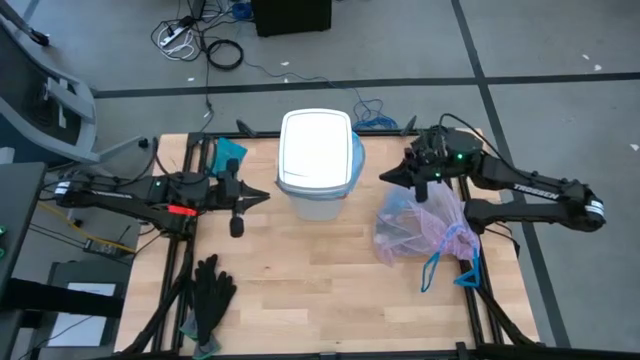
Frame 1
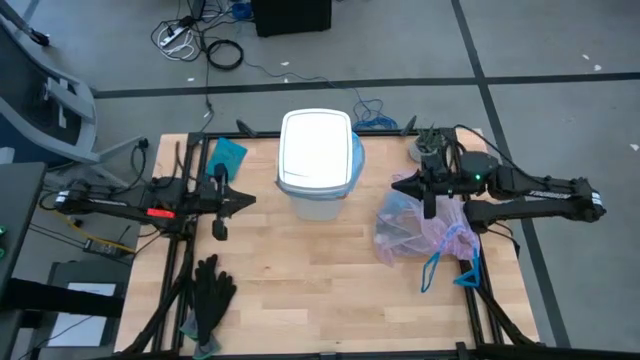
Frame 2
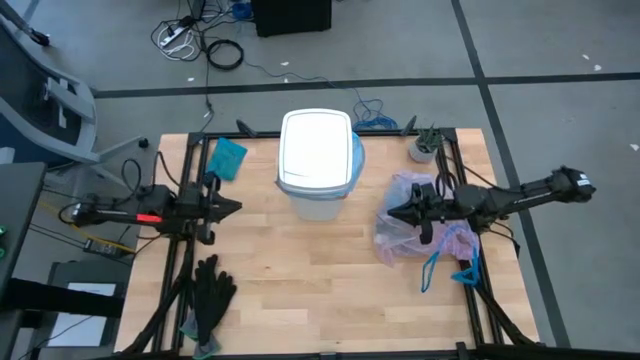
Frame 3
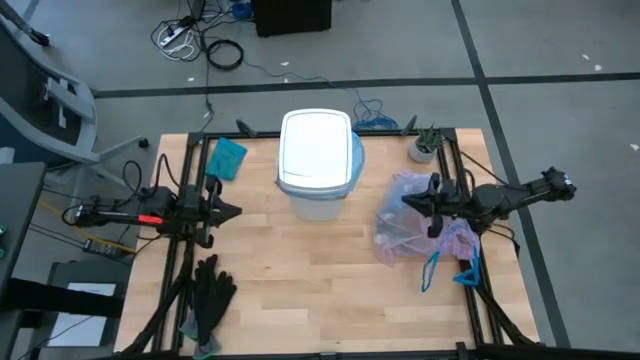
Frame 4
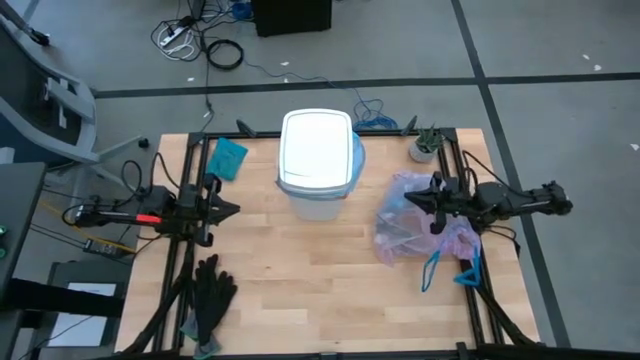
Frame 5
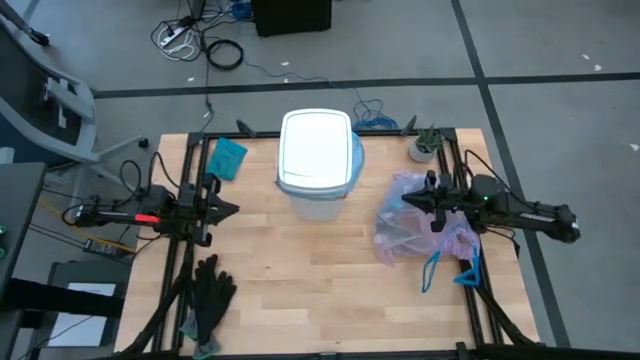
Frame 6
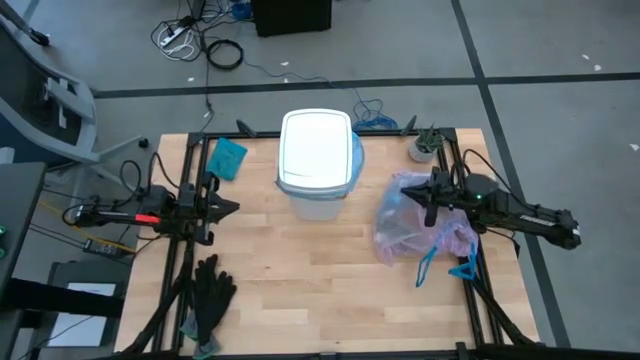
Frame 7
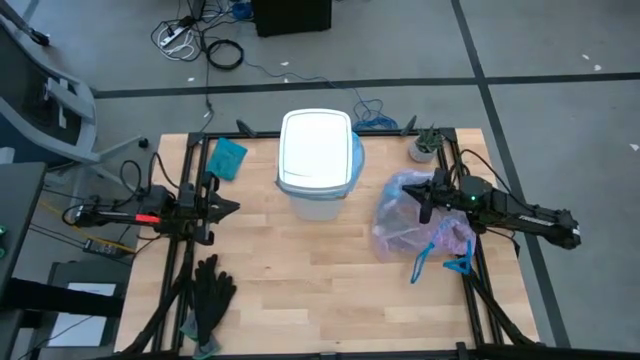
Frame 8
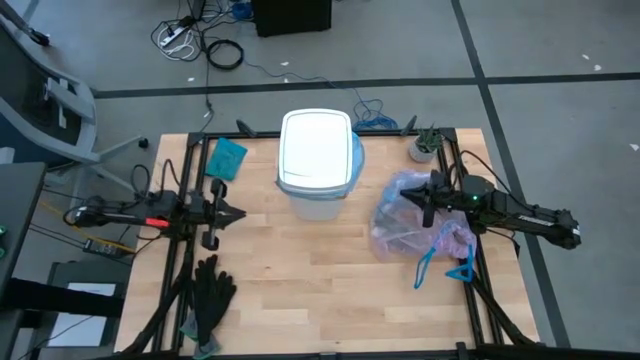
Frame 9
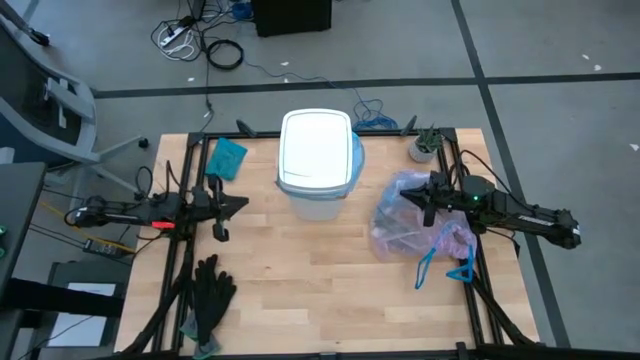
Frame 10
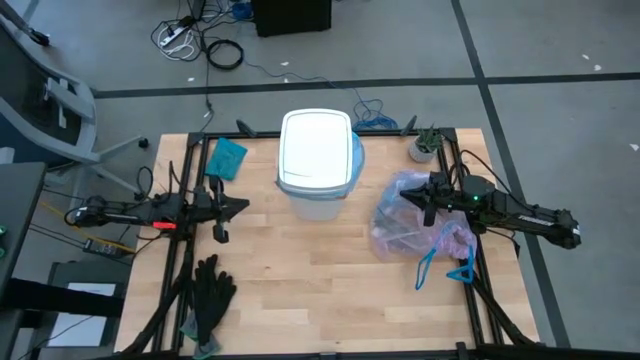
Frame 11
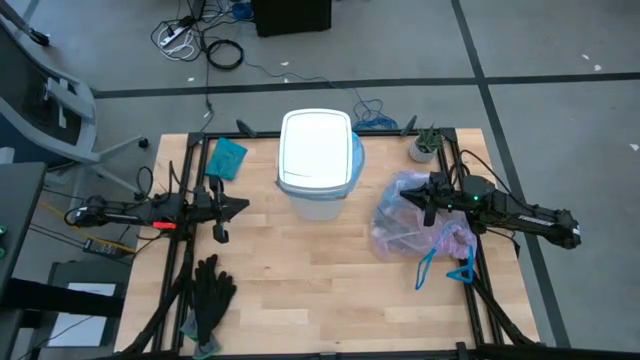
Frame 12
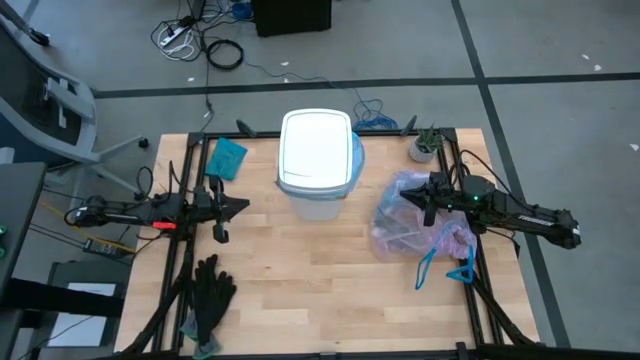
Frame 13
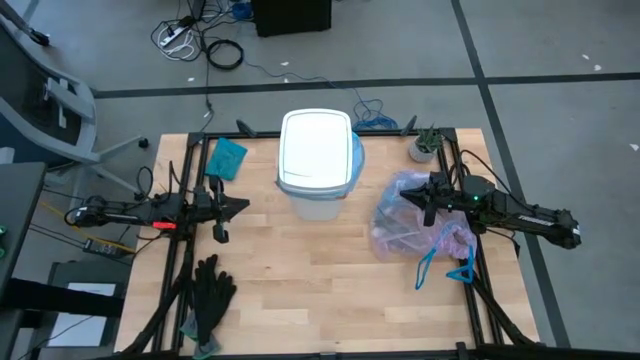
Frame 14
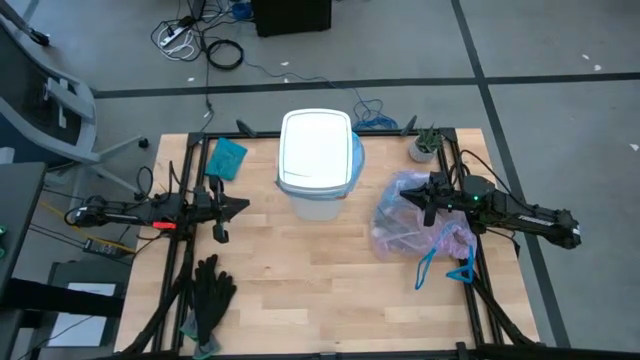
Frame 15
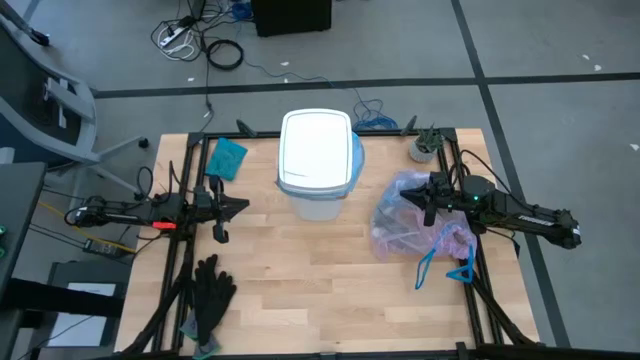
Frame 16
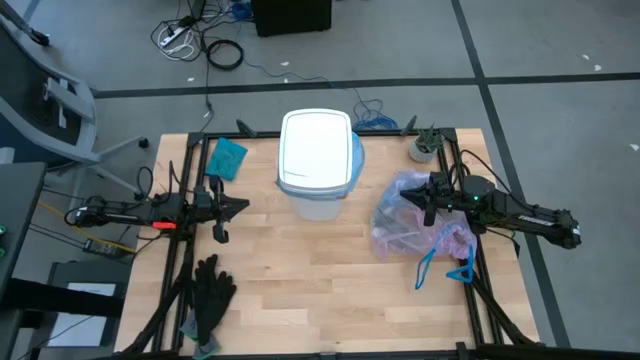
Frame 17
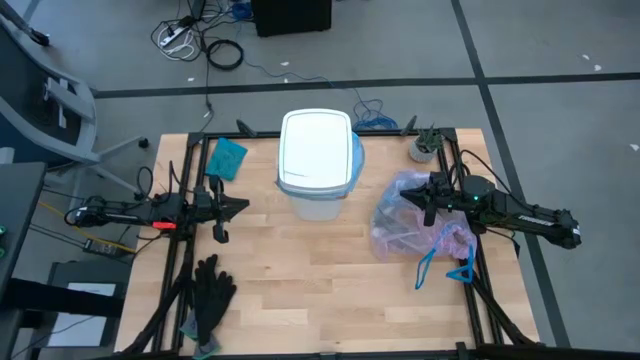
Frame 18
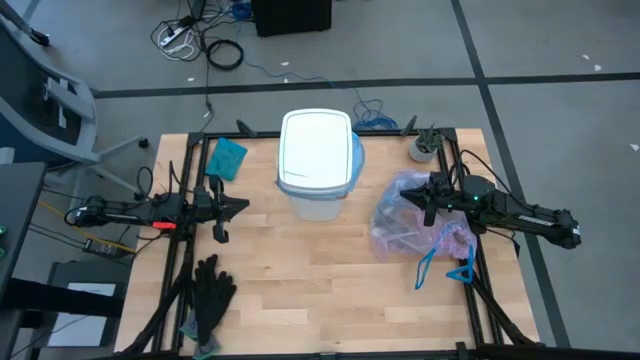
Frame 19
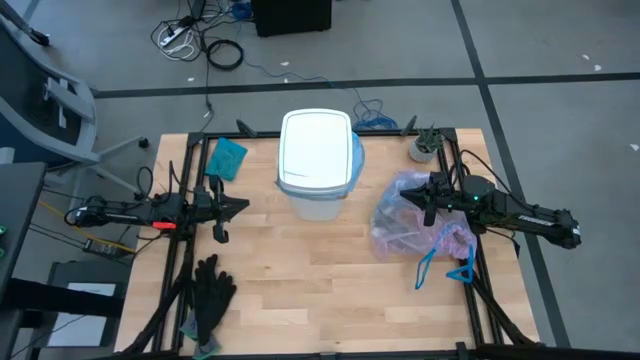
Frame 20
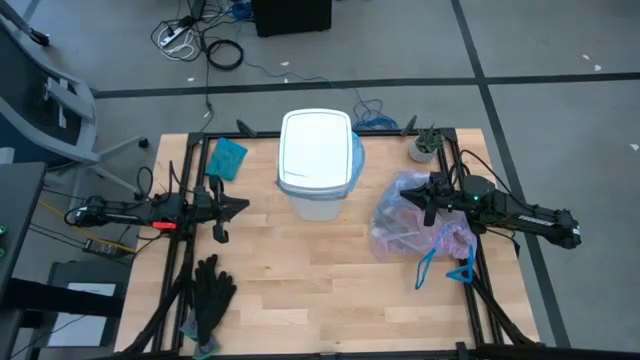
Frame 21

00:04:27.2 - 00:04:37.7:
Task: place trash/remove bag and relplace
Return to Home Position

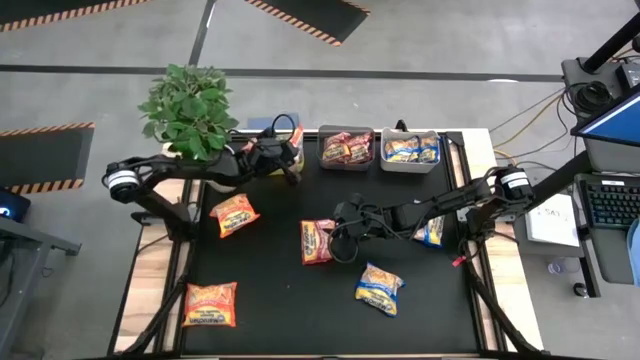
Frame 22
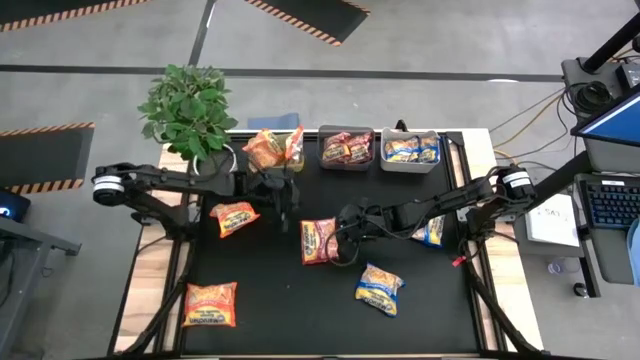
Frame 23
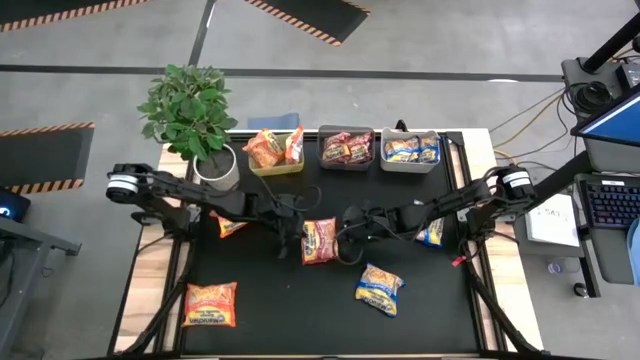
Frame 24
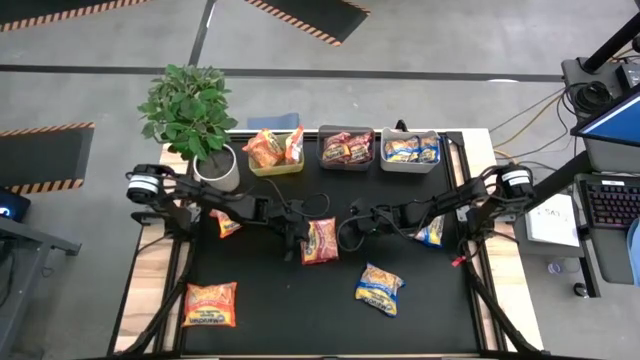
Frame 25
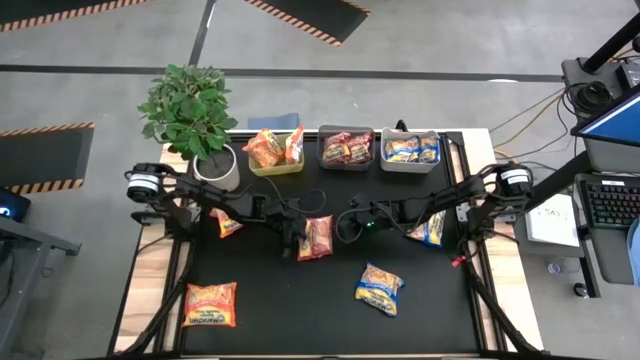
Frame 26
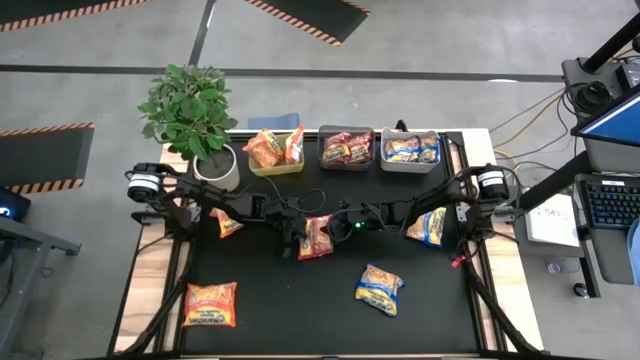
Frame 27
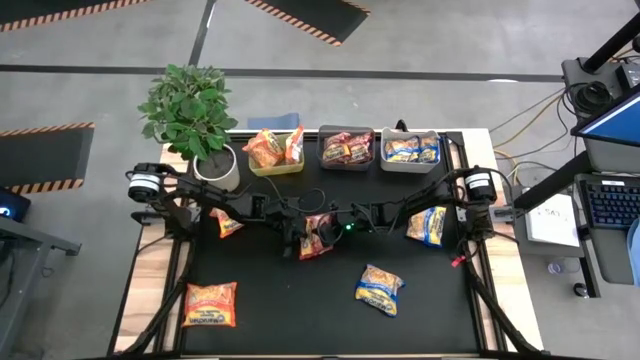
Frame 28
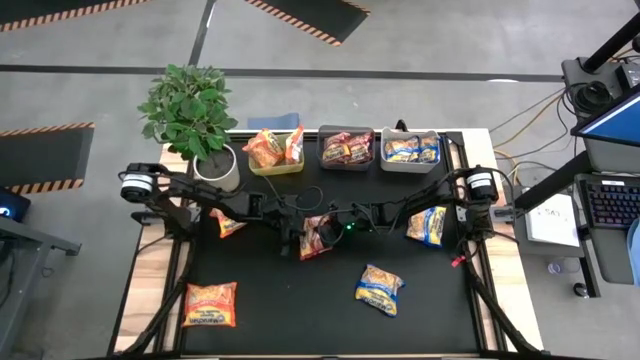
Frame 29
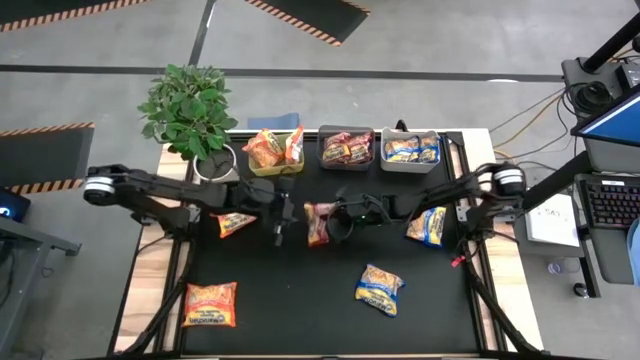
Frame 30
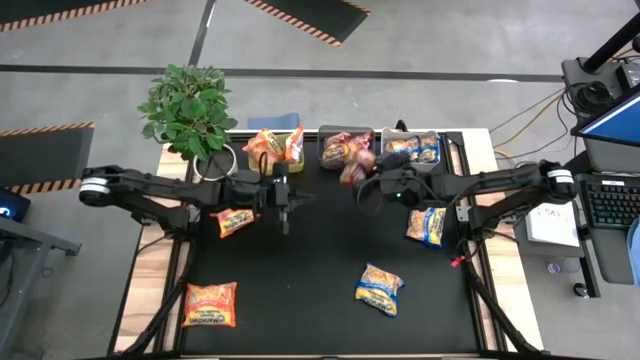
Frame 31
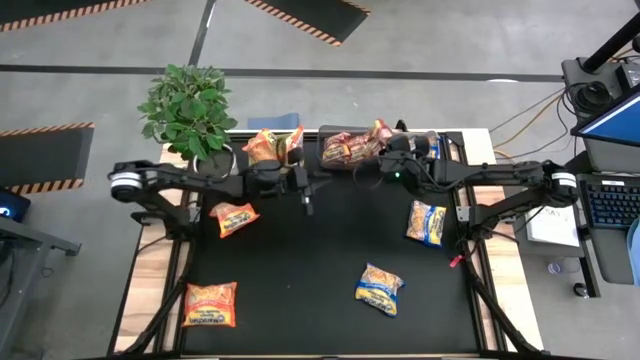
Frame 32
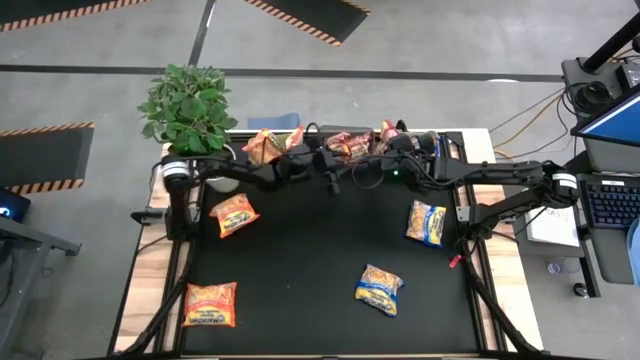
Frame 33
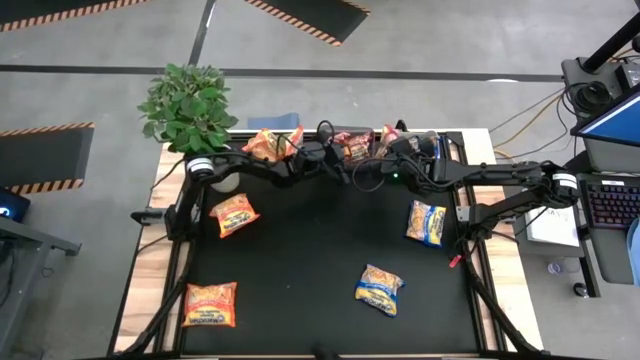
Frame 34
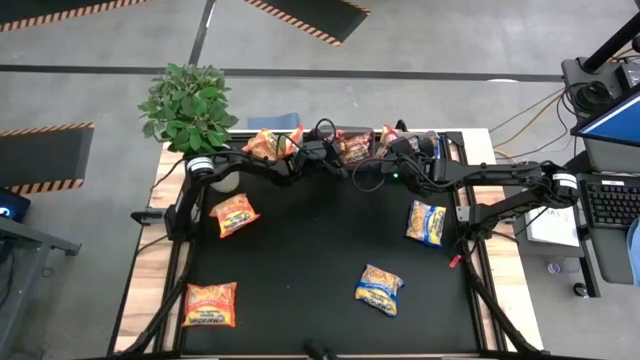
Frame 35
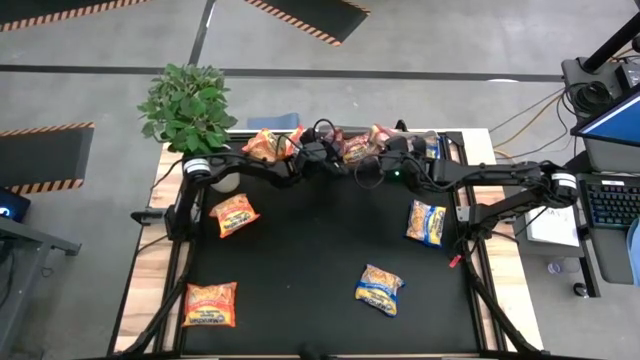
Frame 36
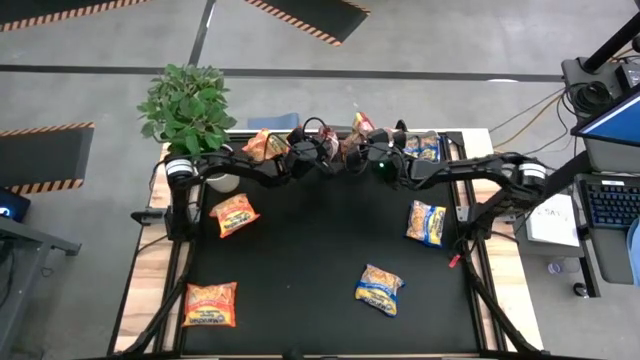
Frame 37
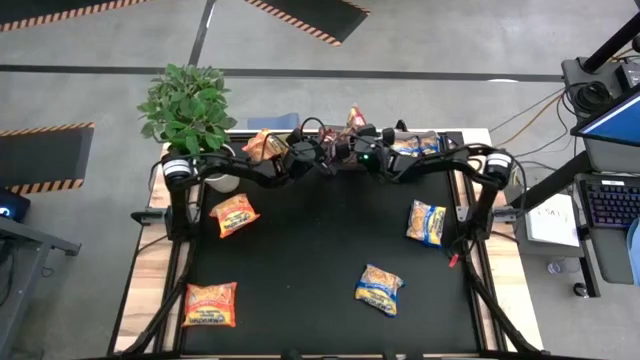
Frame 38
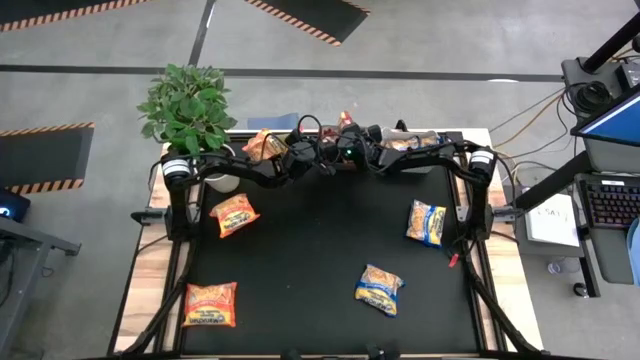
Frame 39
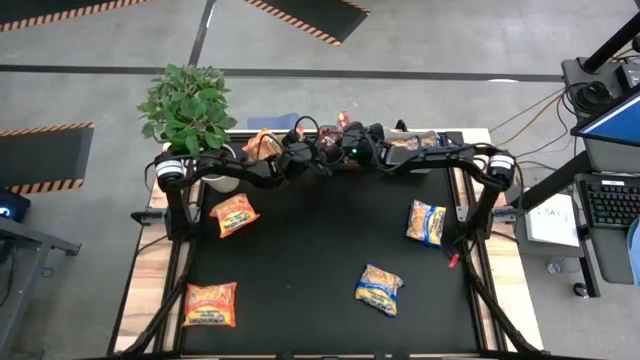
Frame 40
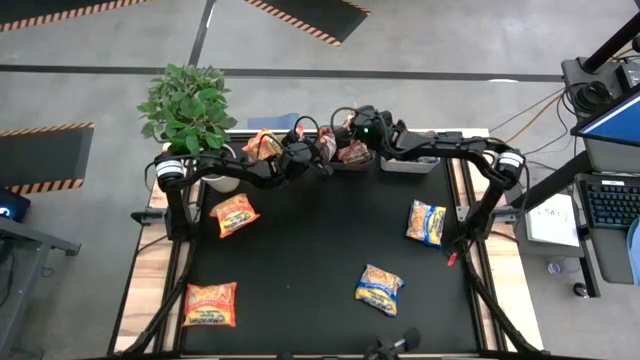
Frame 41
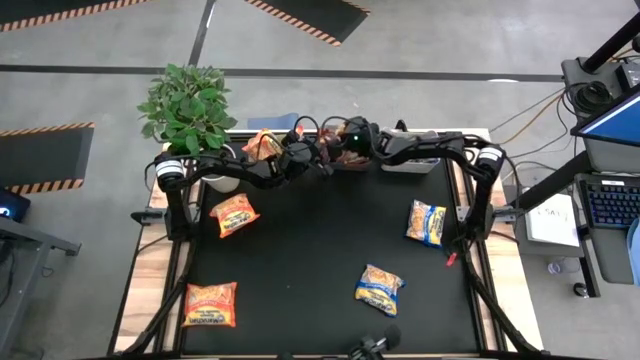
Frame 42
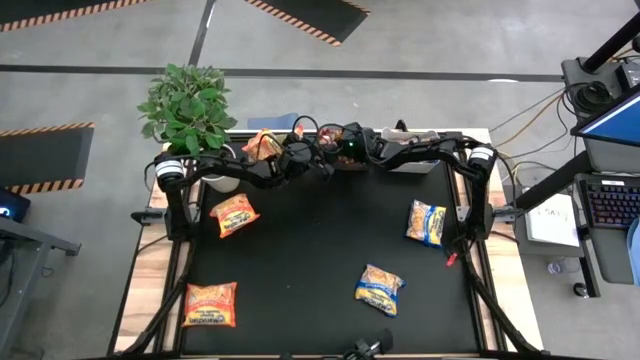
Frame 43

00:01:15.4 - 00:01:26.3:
Task: Sort Maruchan noodles
Put the red noodle pack into the black bin

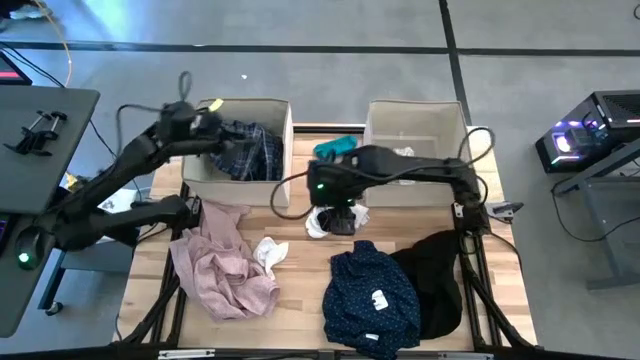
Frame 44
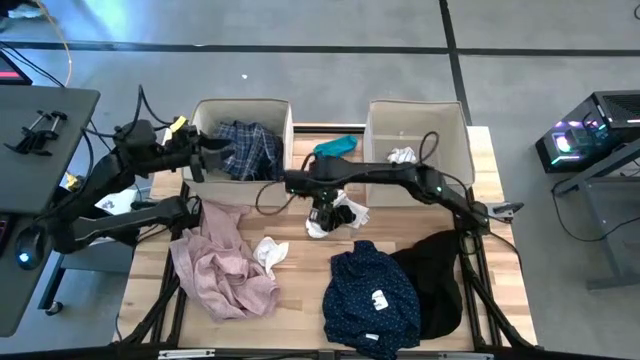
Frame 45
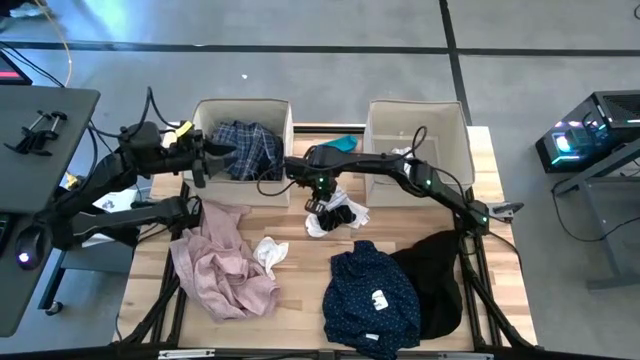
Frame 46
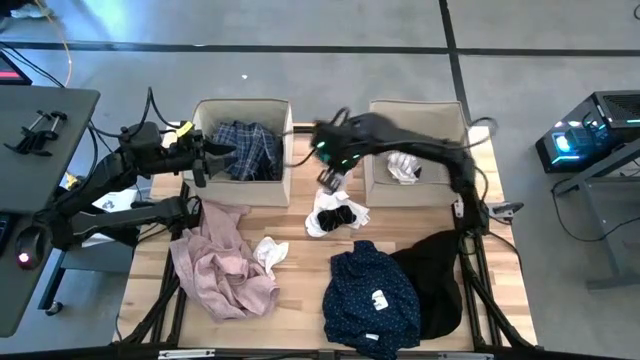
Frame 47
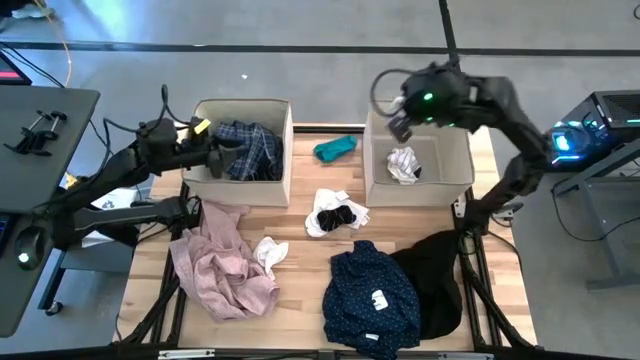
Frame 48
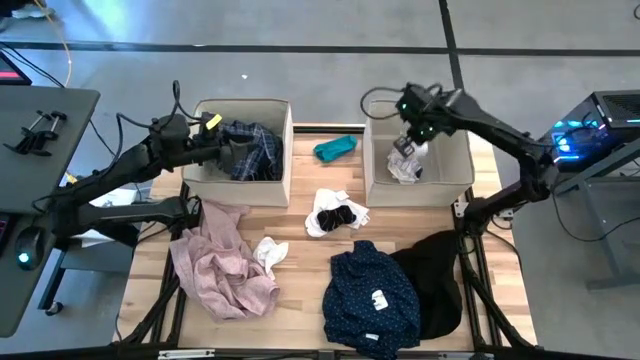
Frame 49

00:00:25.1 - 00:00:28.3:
Task: Sort clothes
Put the white striped sock into the right laundry organizer
